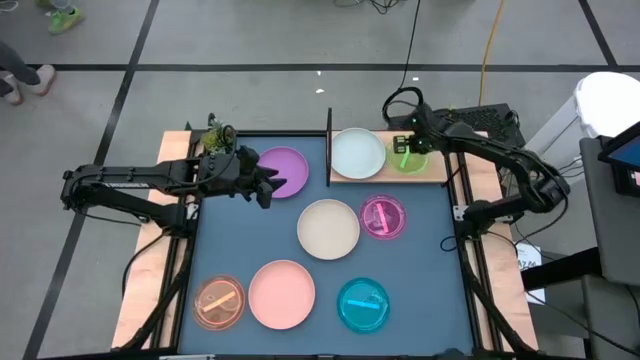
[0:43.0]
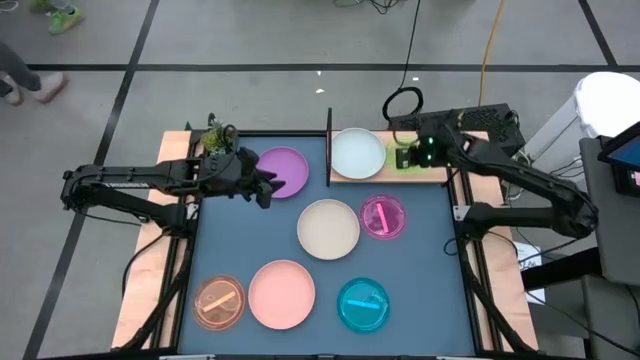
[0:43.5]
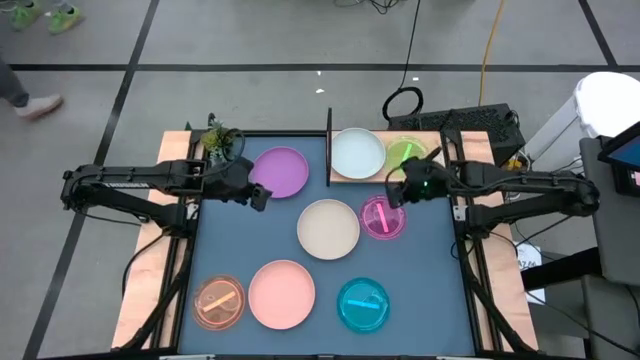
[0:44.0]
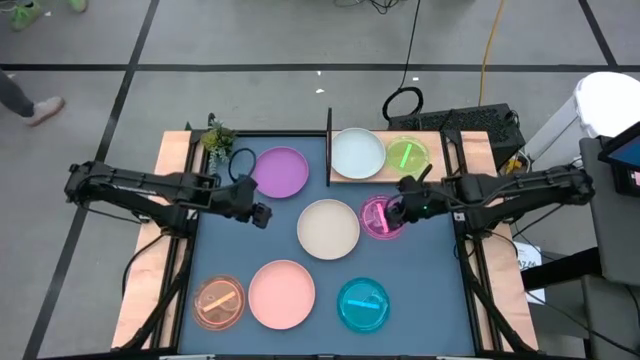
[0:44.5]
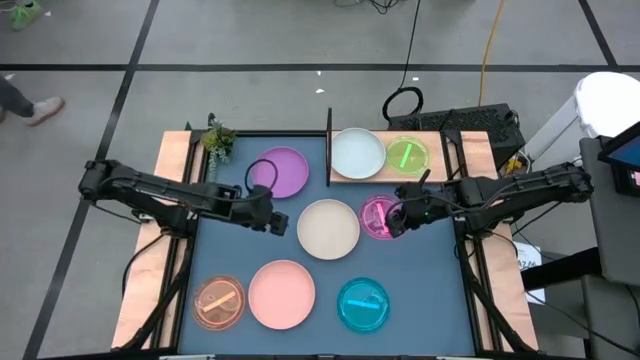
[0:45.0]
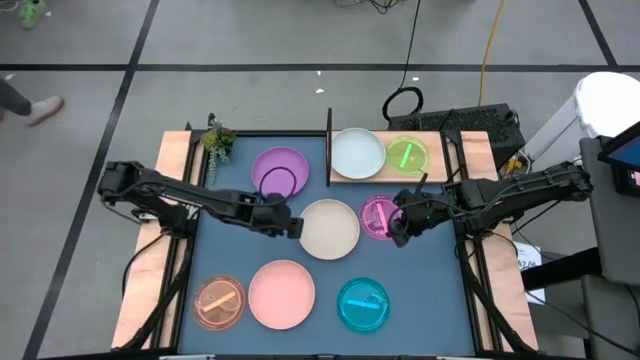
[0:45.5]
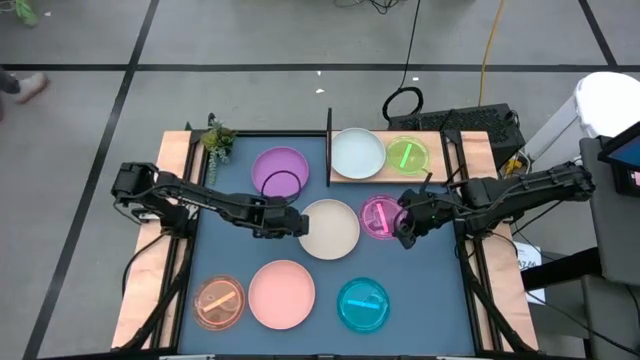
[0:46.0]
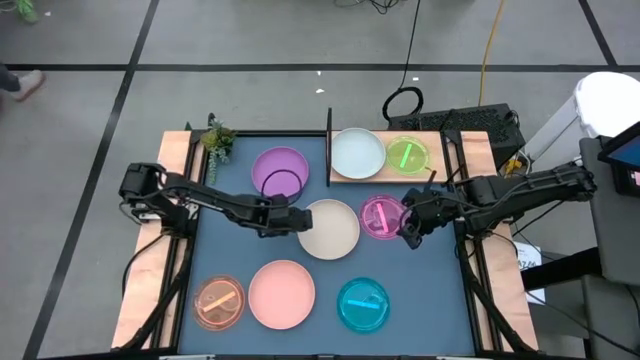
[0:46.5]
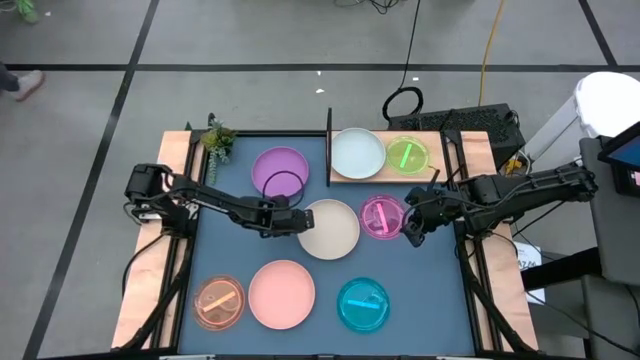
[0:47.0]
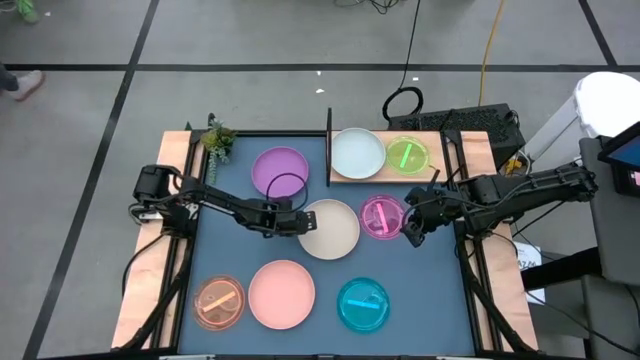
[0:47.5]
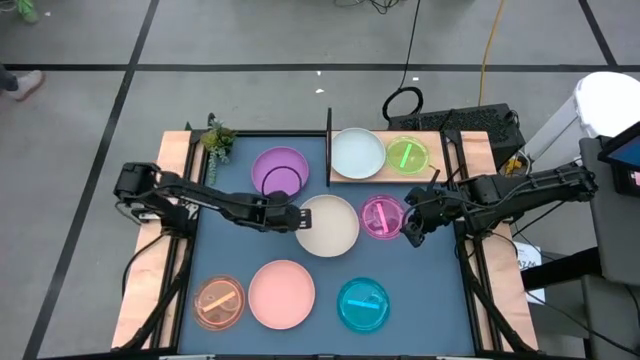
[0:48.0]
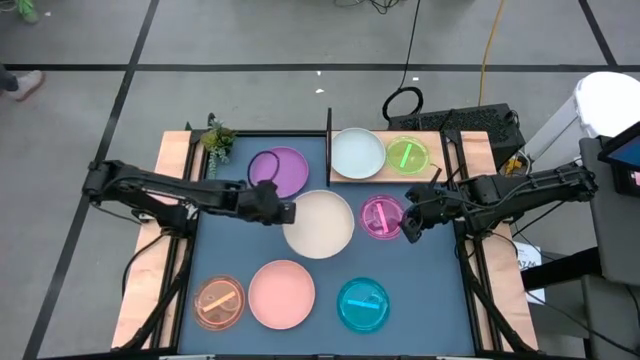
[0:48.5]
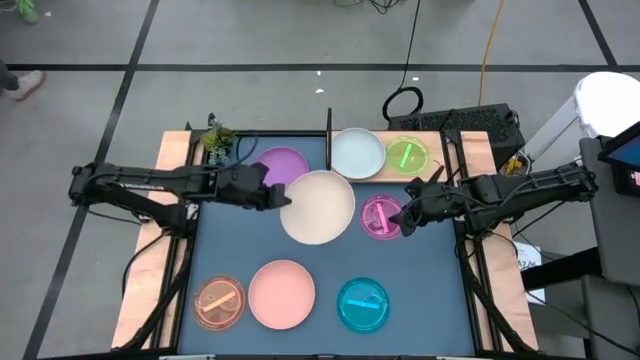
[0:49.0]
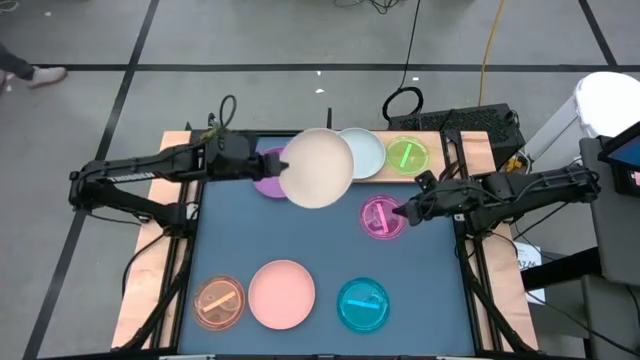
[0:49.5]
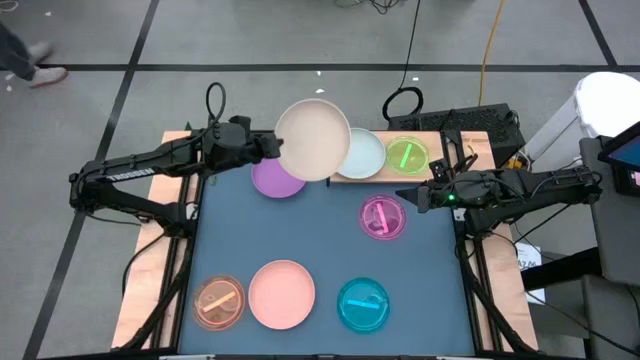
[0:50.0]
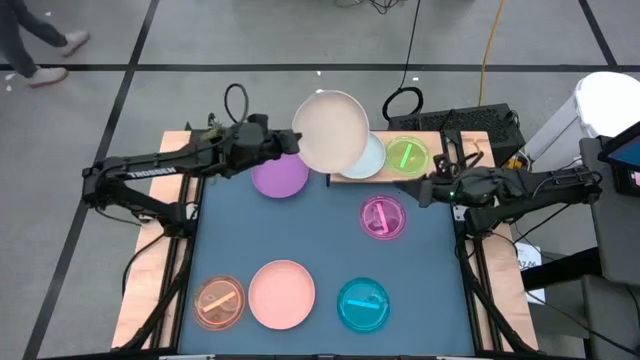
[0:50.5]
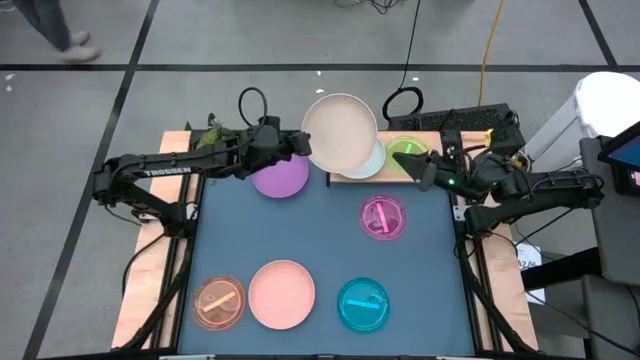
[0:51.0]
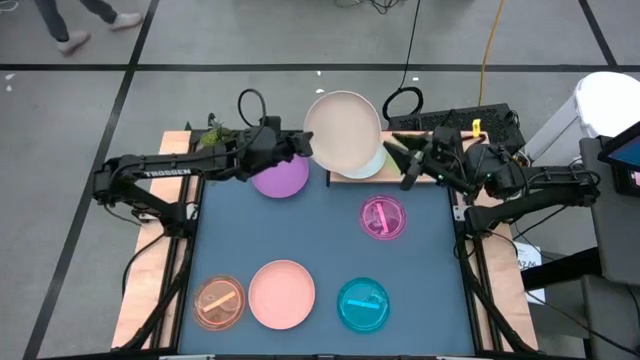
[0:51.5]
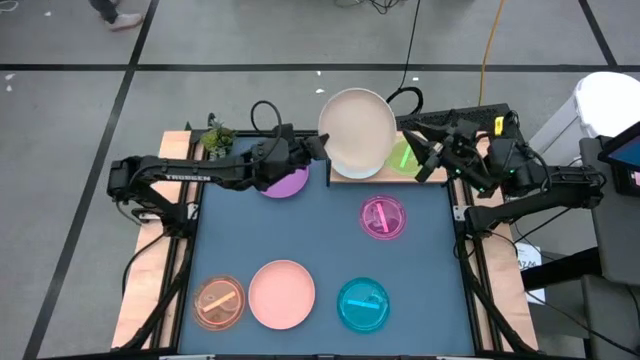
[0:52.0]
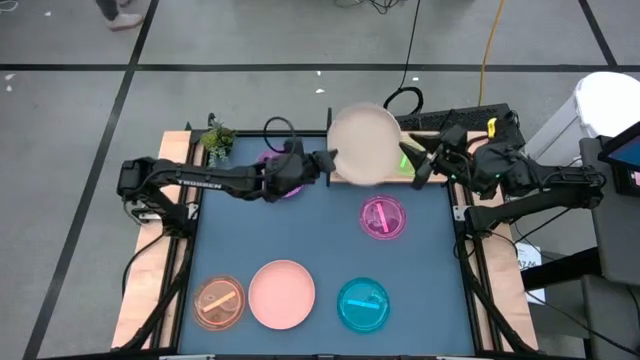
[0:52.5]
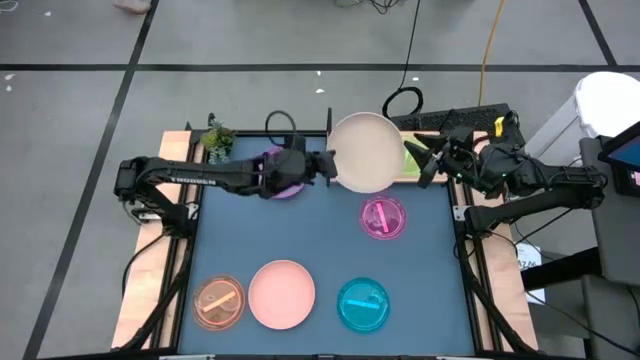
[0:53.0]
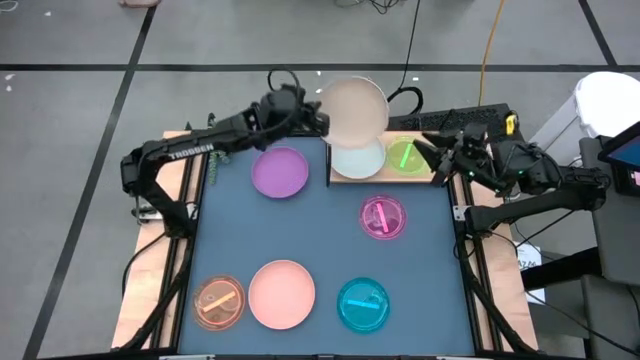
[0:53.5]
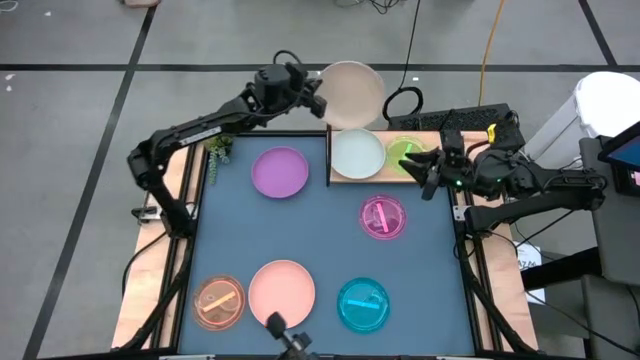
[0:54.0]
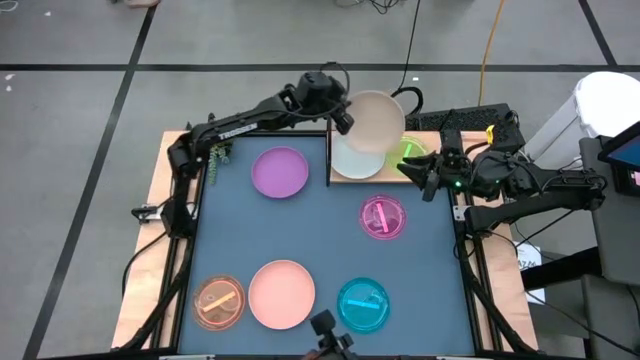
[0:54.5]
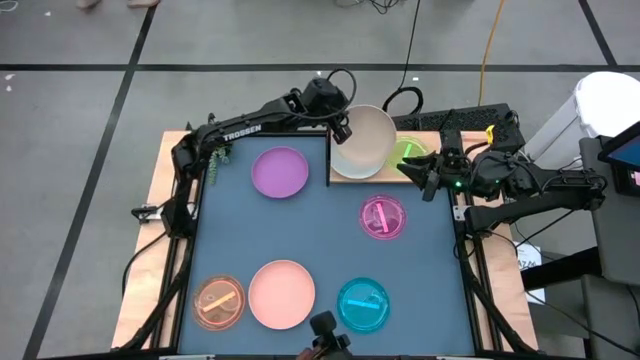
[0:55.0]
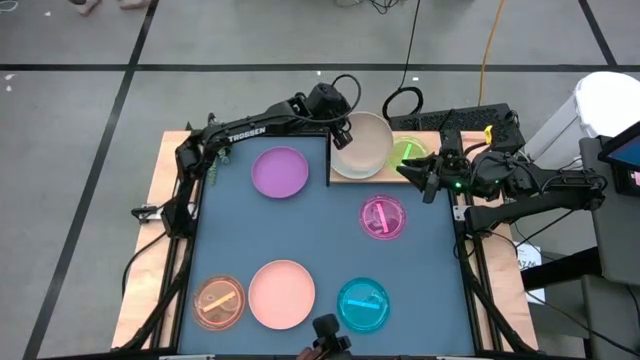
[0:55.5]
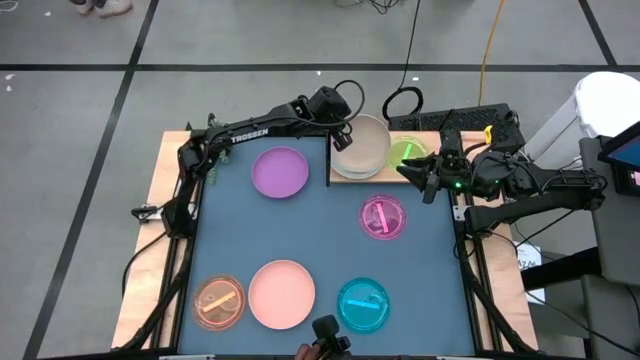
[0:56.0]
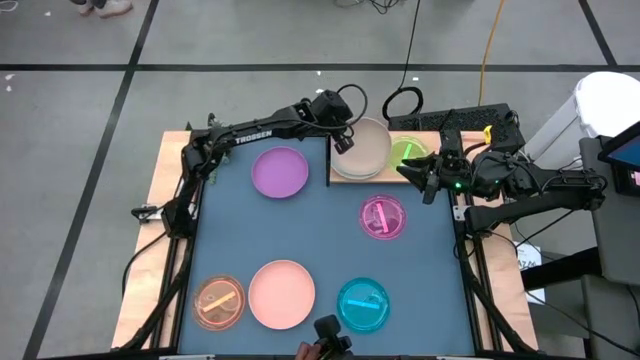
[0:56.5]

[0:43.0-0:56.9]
Task: Place and stack plates onto a shelf
Stack the white plate on top of the gray plate on the shelf

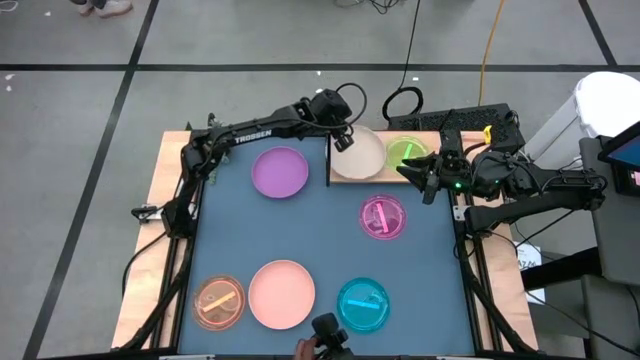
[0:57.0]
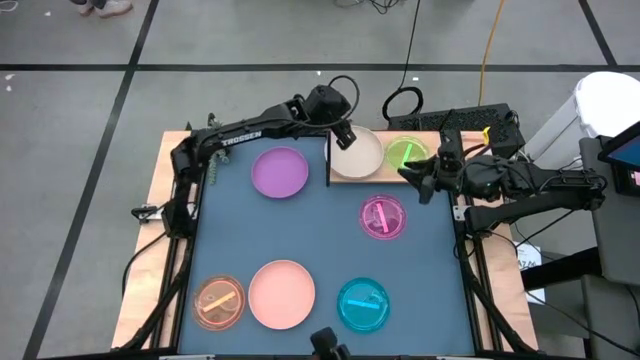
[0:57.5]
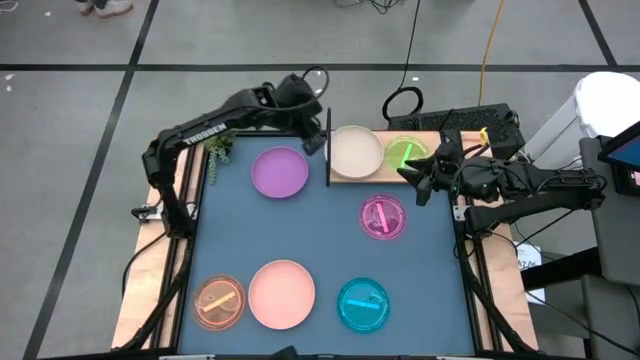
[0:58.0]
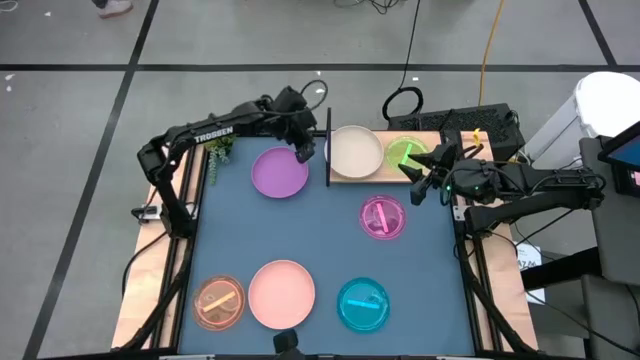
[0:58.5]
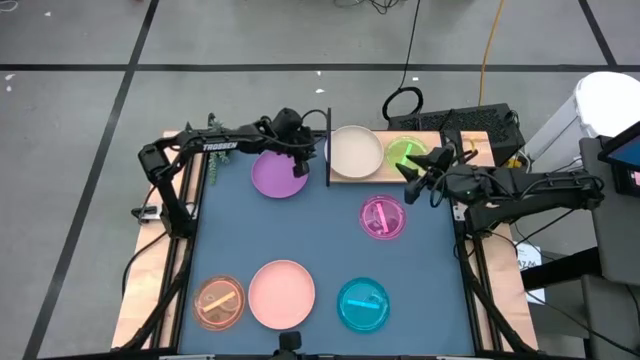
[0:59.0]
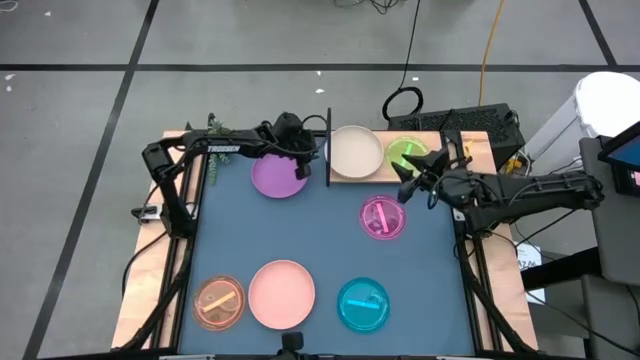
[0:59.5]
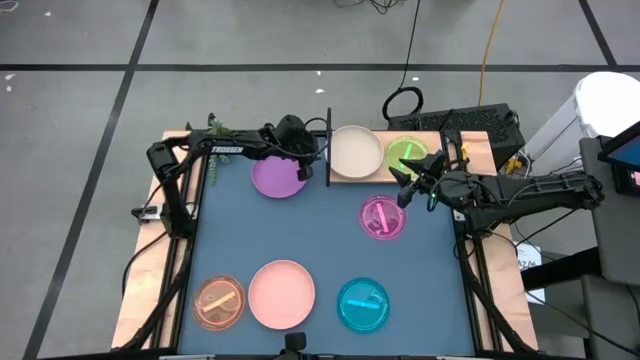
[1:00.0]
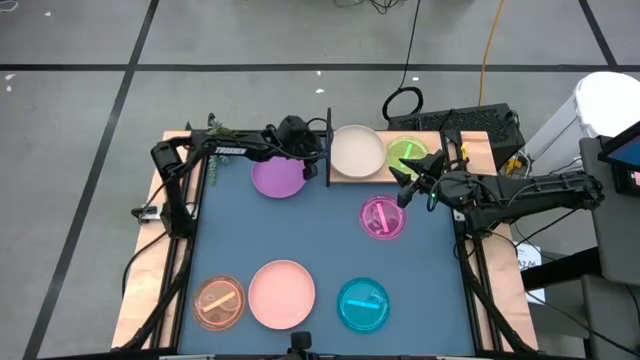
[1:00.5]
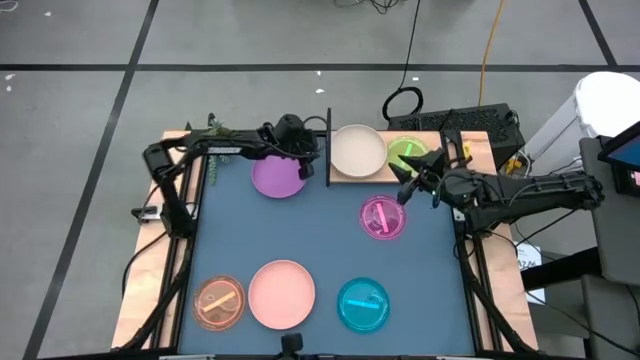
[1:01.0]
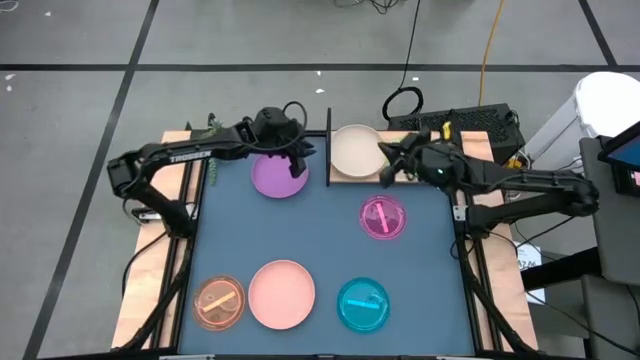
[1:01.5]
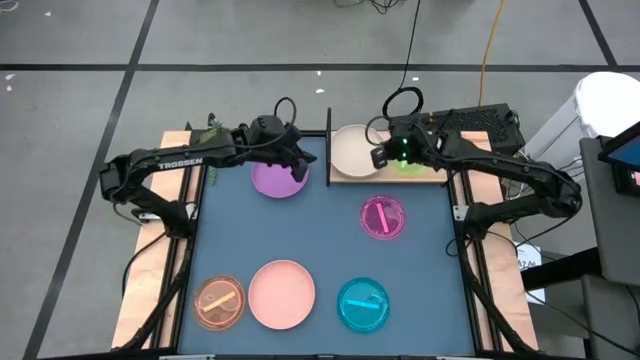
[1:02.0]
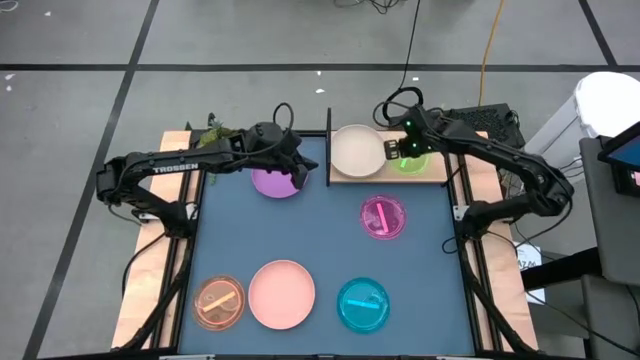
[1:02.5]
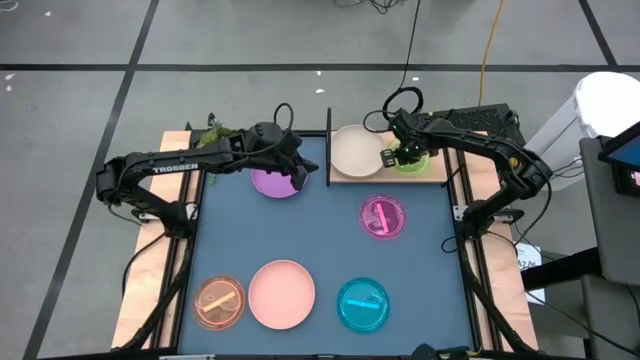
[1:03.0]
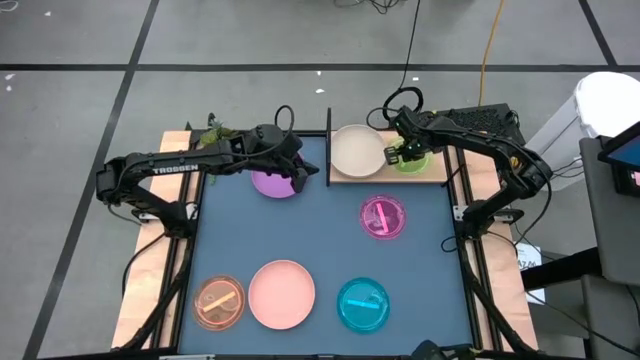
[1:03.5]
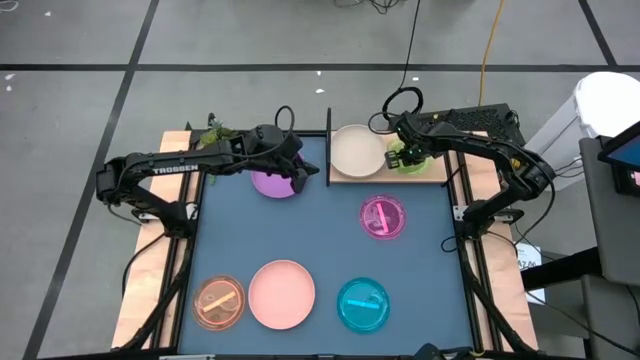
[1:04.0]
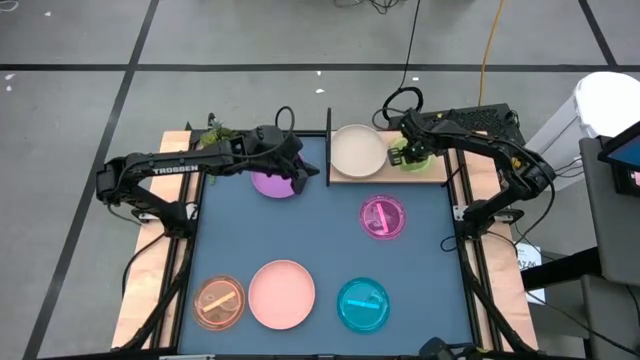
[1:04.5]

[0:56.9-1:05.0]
Adjust the plates on the shelf
